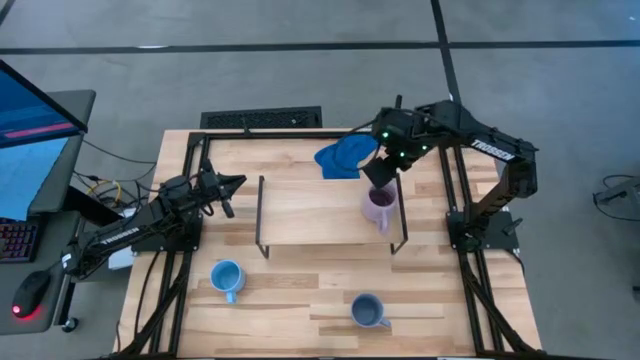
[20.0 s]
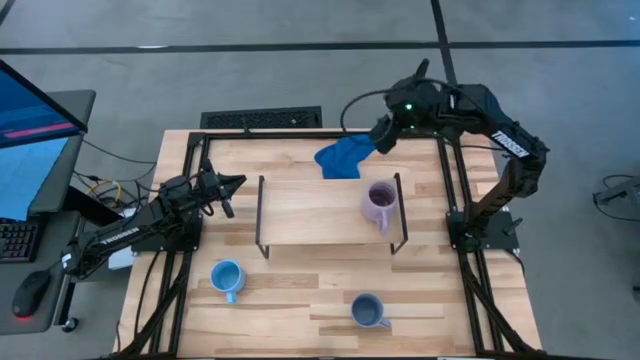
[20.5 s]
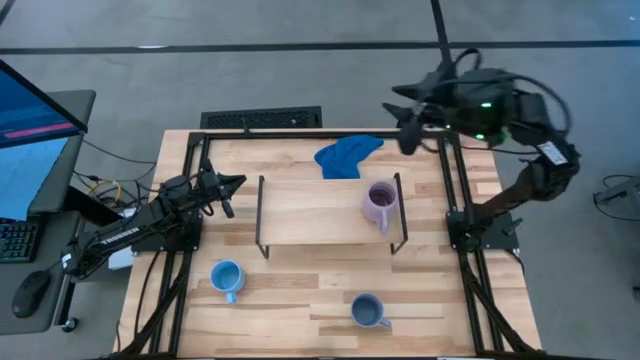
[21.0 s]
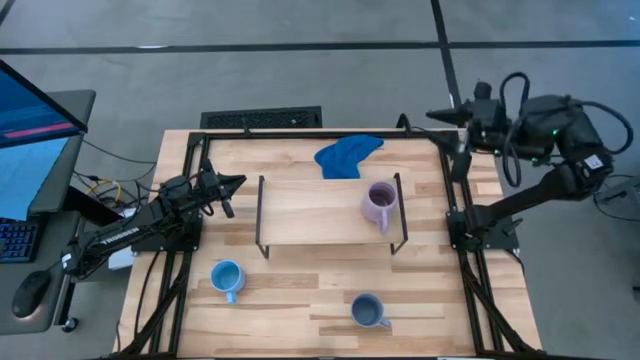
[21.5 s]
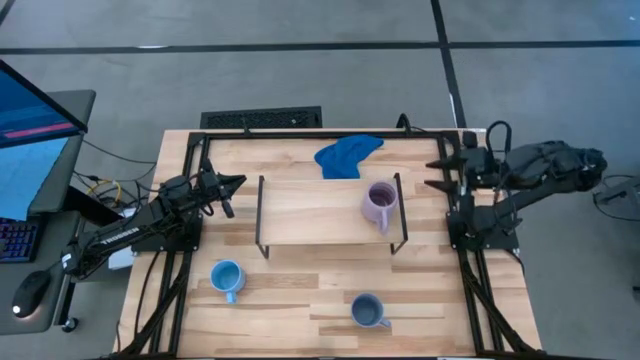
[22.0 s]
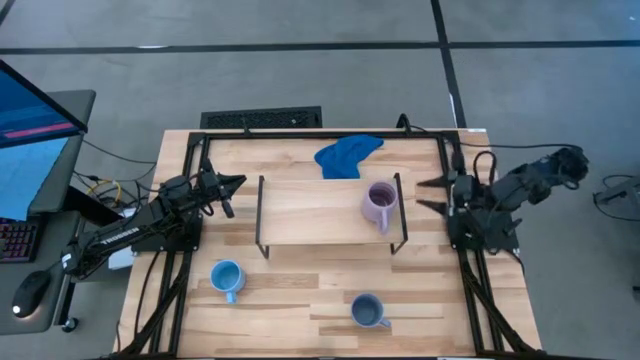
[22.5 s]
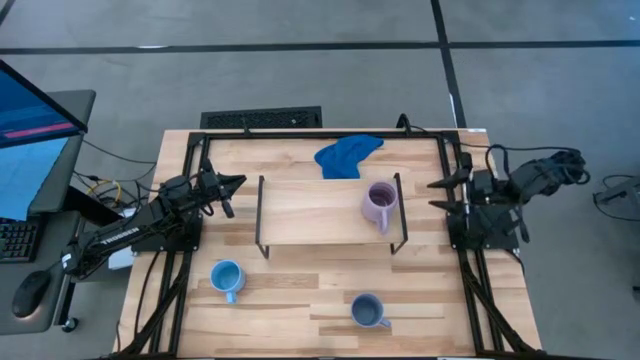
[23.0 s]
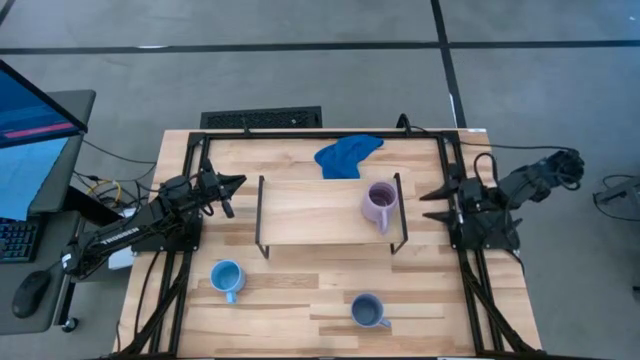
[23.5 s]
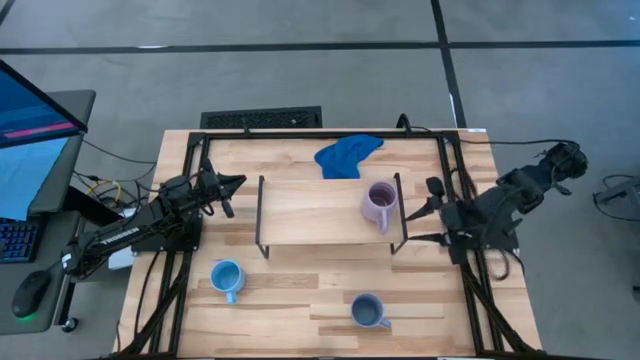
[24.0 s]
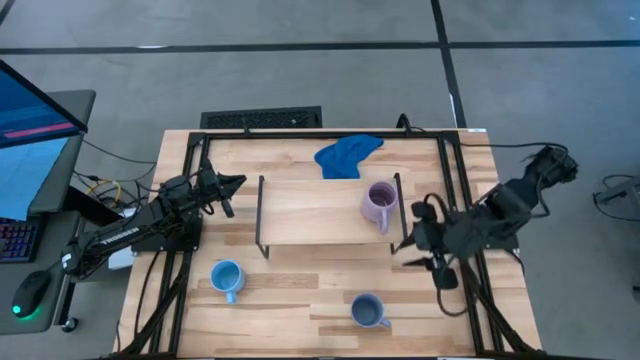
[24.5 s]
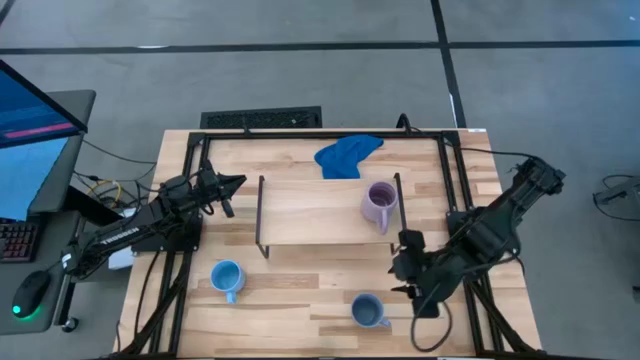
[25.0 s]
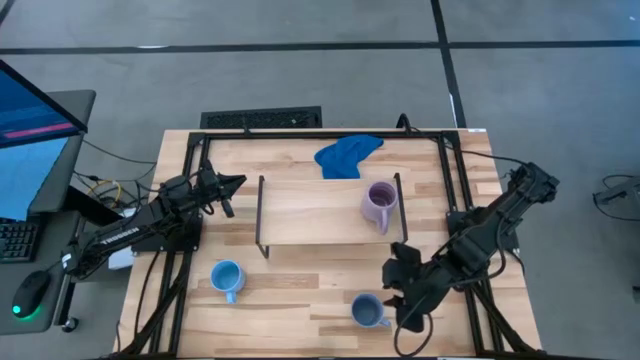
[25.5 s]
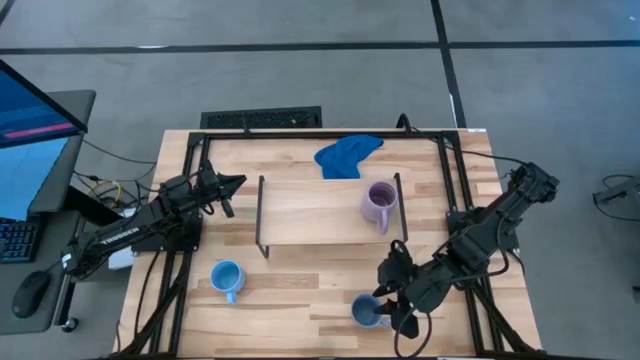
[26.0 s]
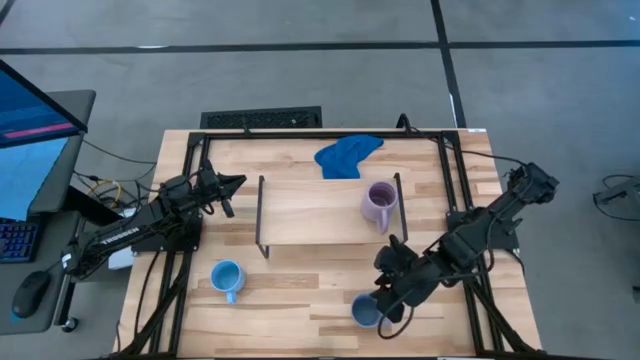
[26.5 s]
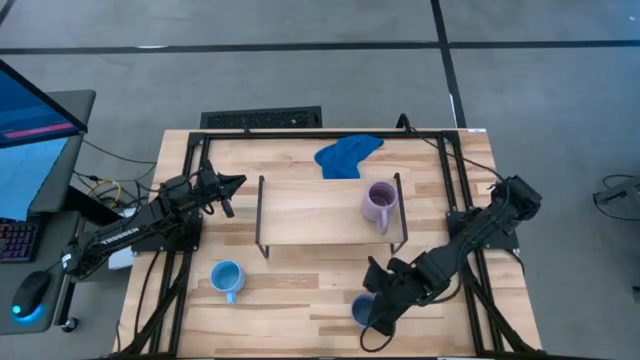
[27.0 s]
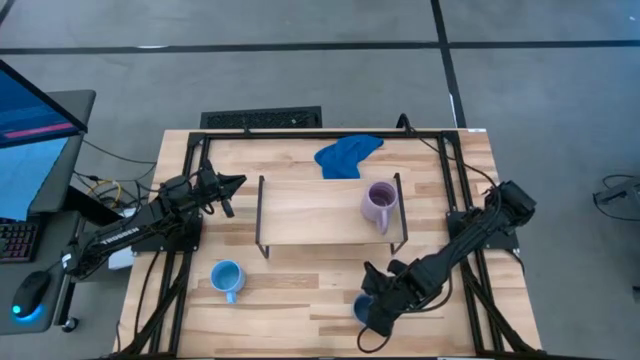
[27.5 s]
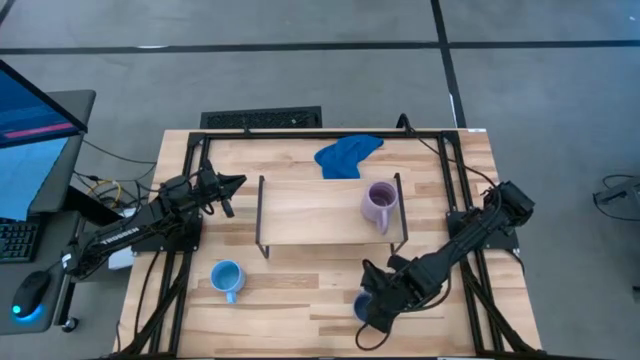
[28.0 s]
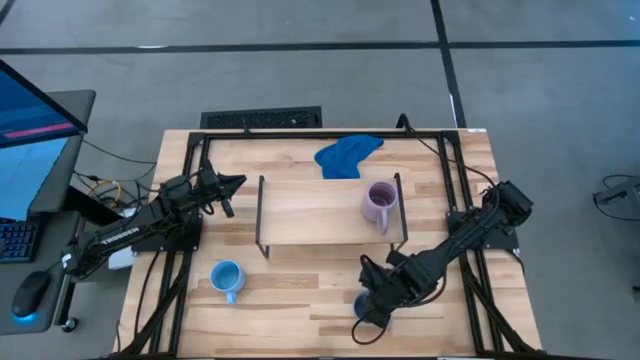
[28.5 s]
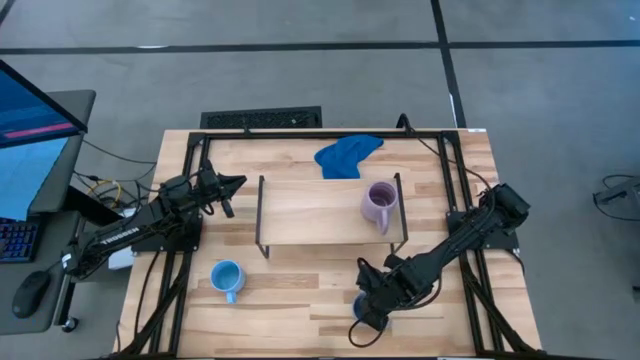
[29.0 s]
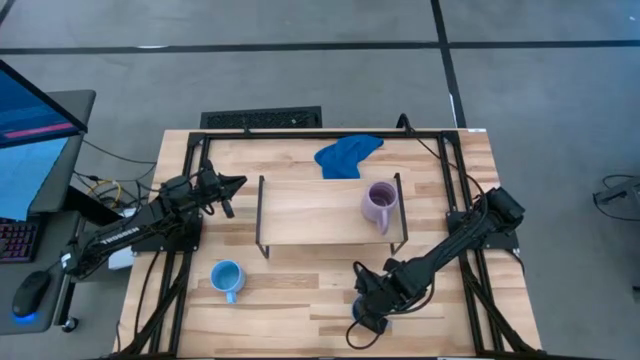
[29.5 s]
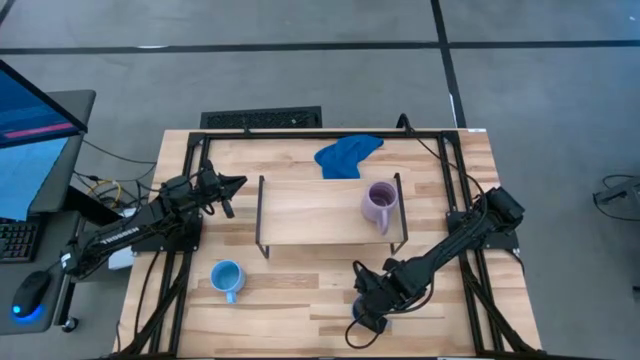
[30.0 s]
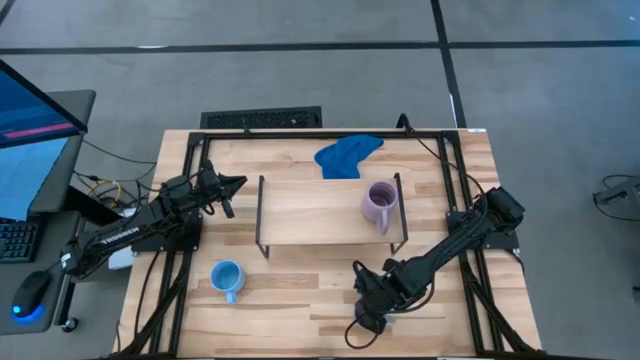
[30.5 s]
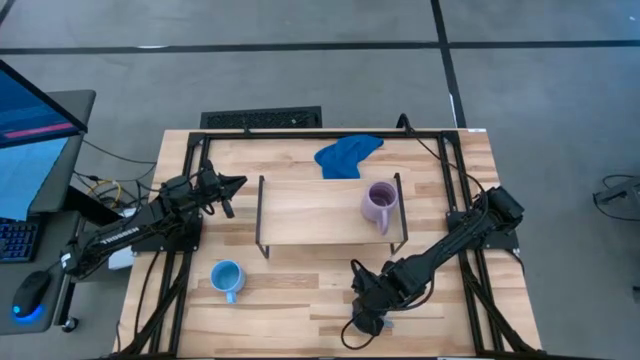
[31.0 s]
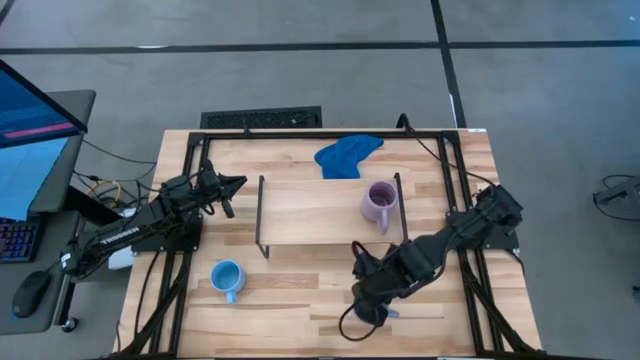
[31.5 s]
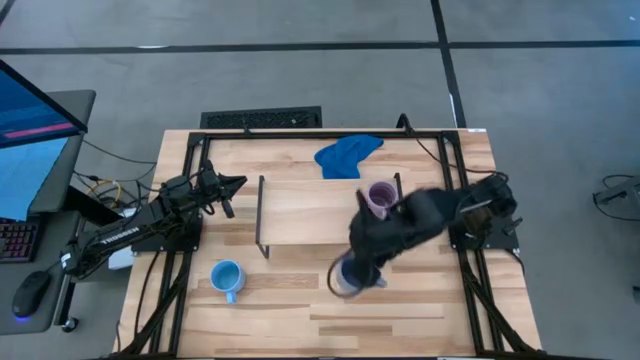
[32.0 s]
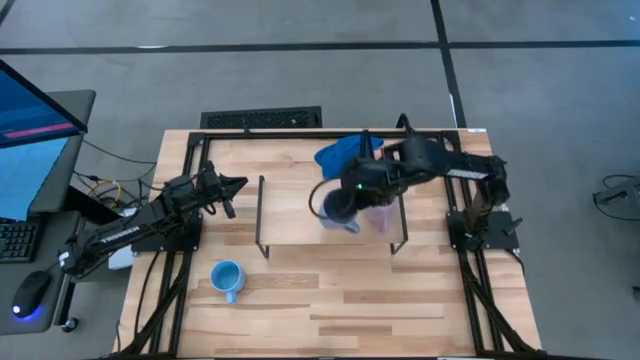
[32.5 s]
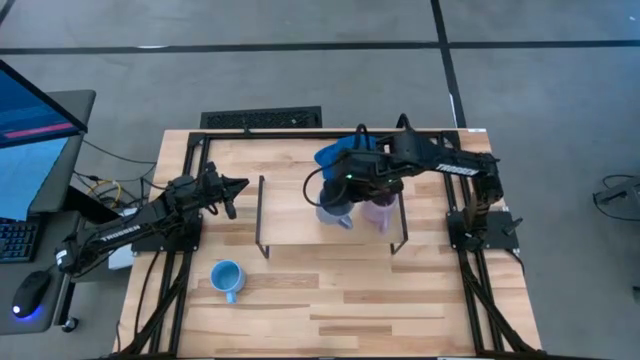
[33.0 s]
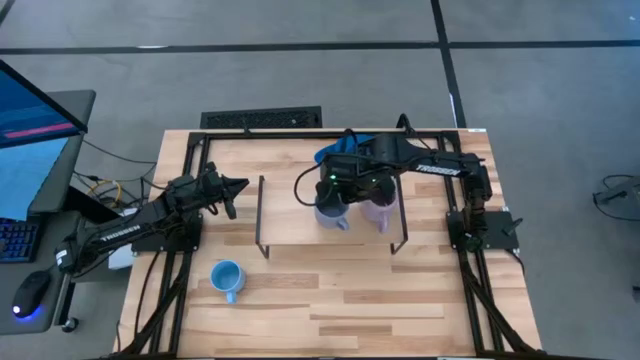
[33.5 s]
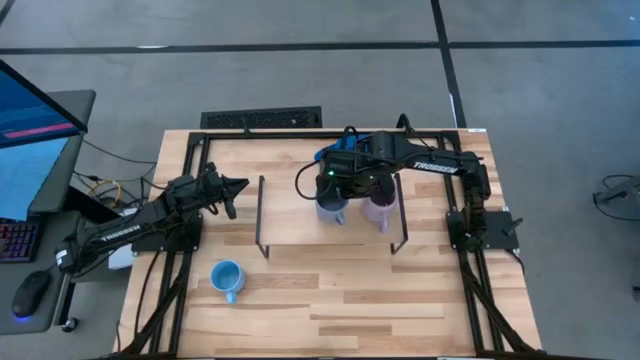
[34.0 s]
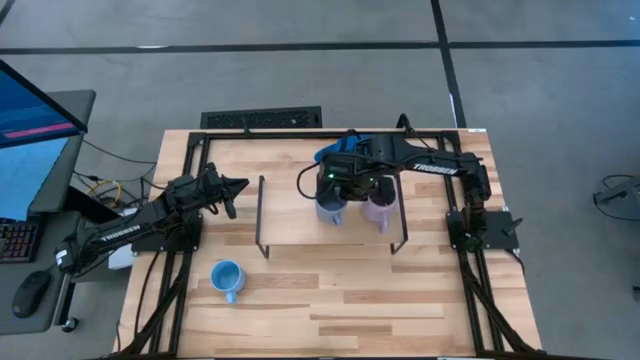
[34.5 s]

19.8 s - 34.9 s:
Task: Stack small to large cups/mugs on shelf
Put the blue mug on the shelf

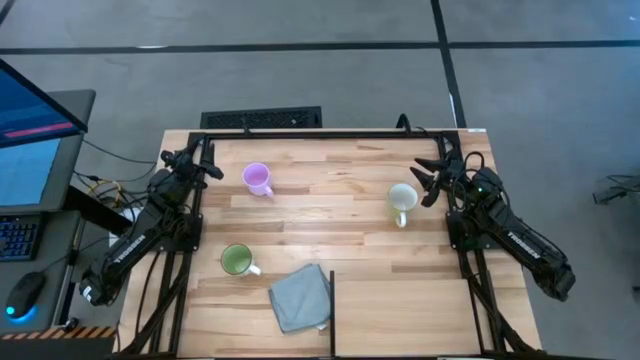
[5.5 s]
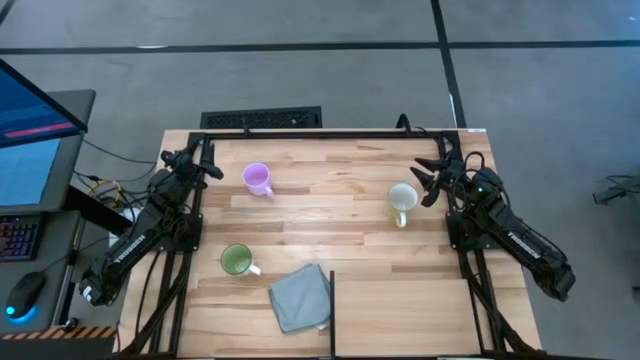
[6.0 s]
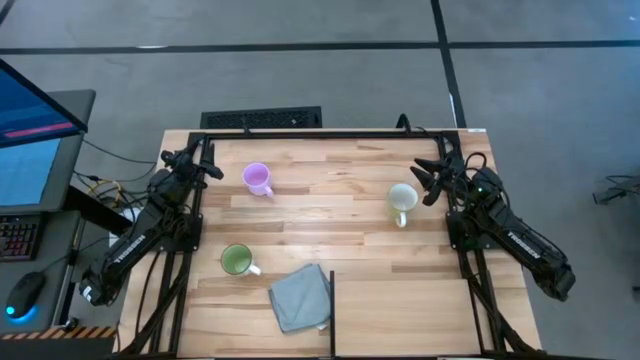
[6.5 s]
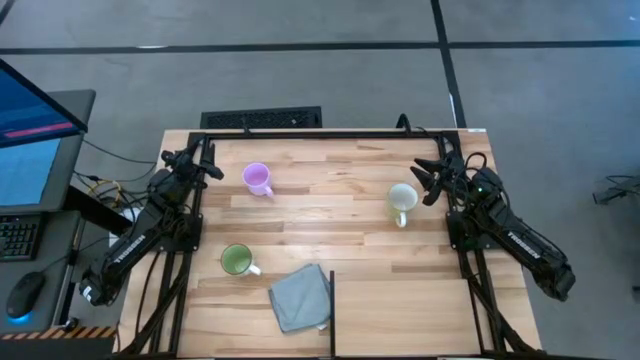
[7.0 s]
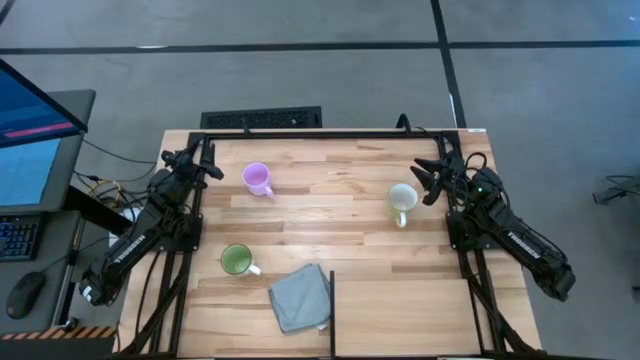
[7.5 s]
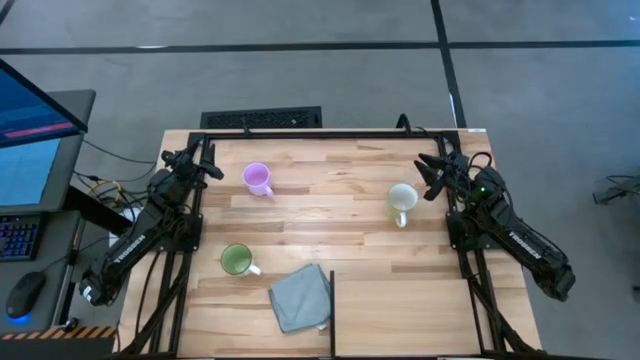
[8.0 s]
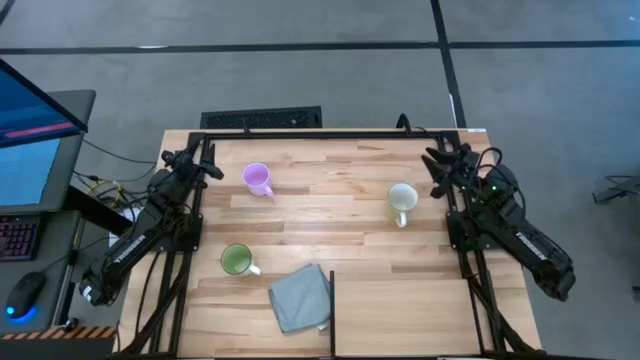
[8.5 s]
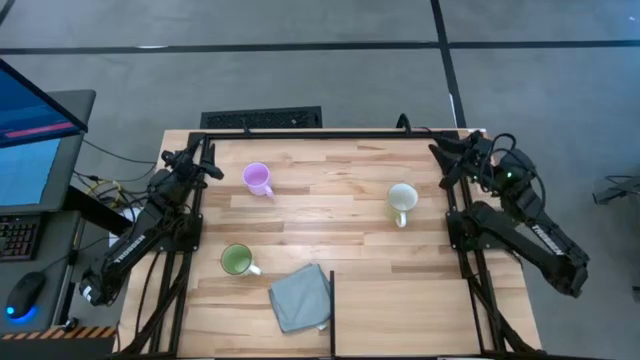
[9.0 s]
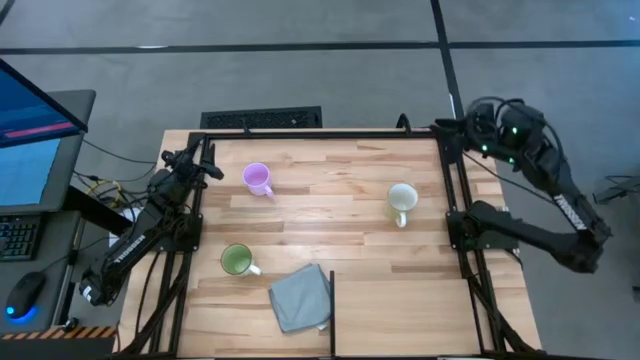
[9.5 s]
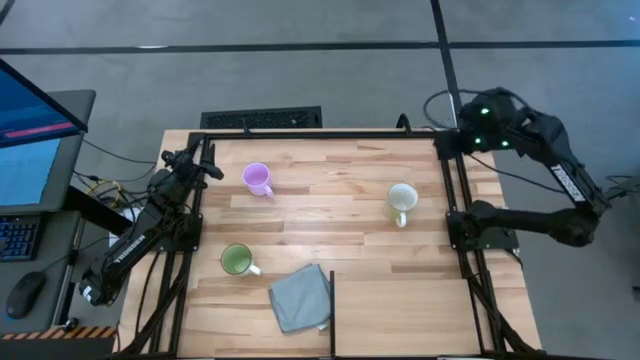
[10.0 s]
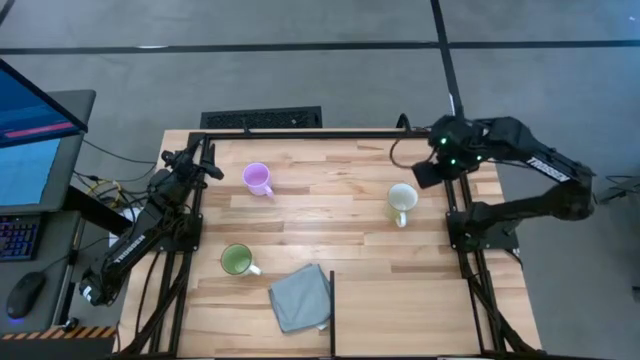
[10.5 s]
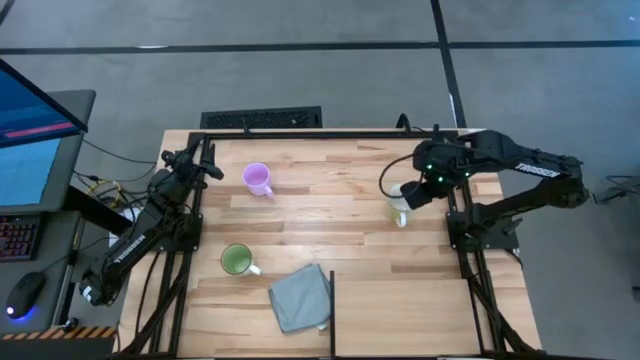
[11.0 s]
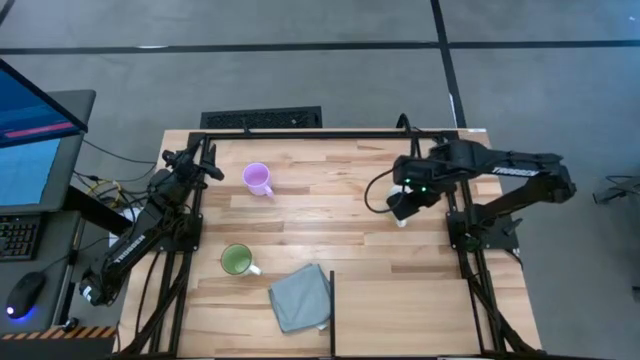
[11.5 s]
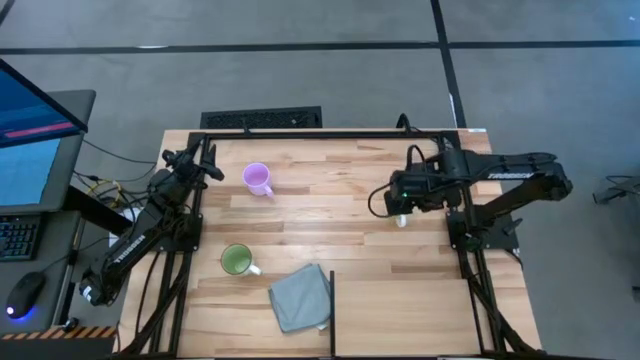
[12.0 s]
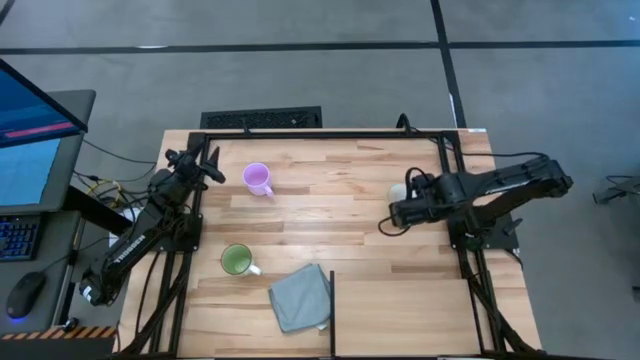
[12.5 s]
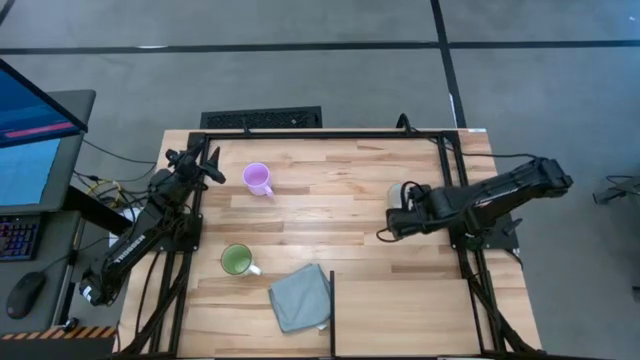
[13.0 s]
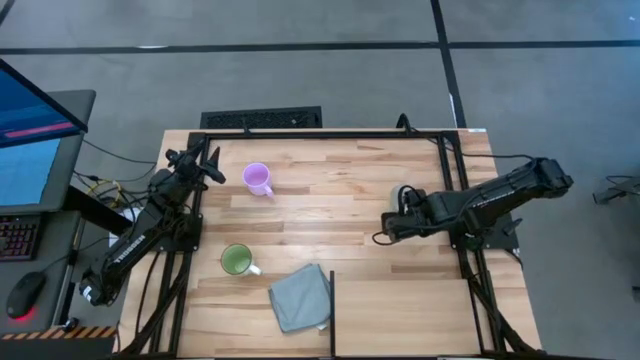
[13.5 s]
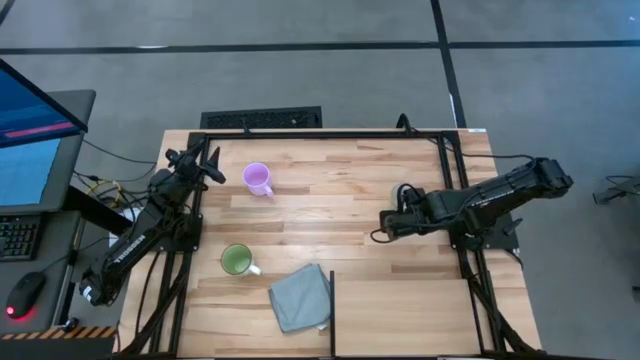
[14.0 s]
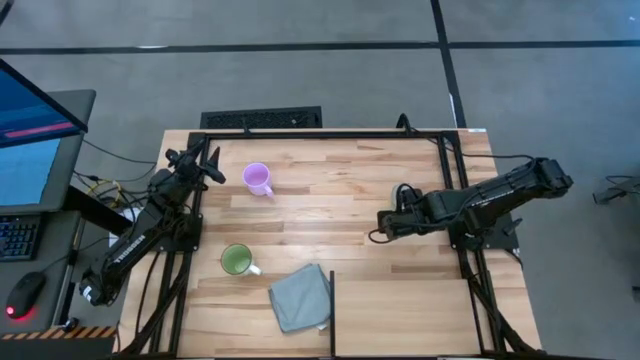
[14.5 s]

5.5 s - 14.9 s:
Task: Stack small to large cups/mugs on shelf
Put the yellow mug on the shelf
